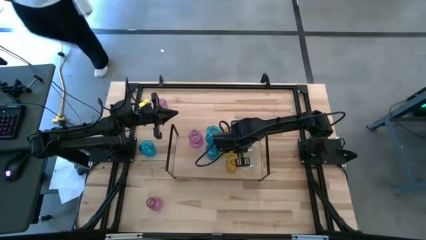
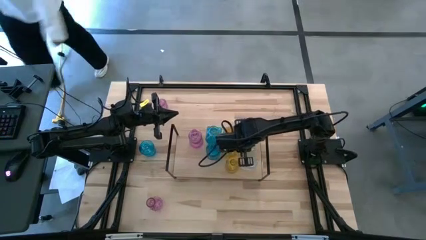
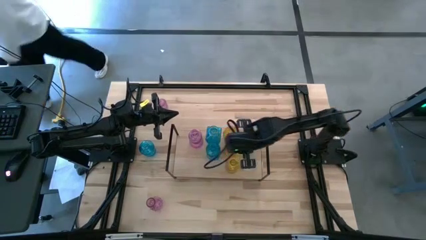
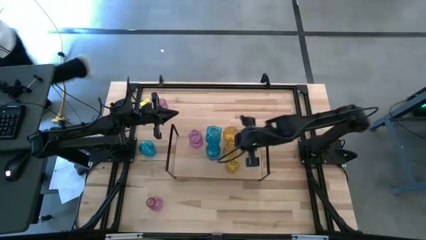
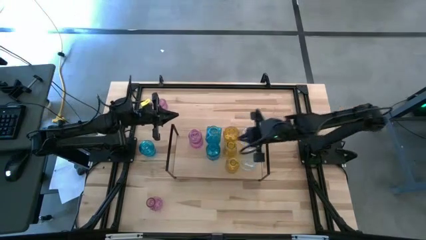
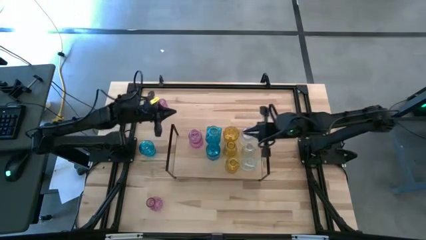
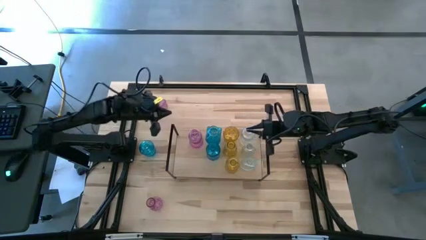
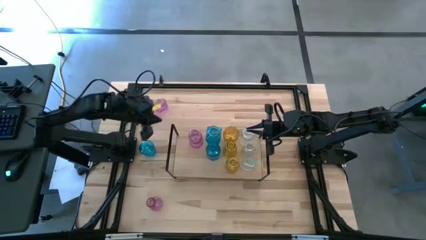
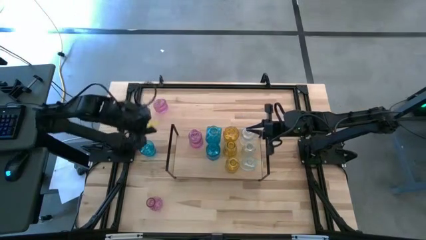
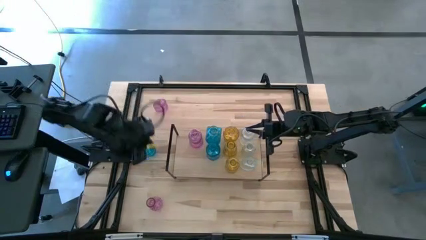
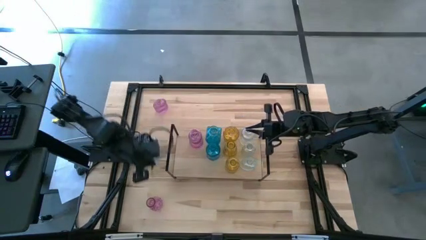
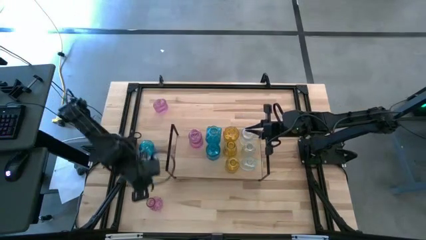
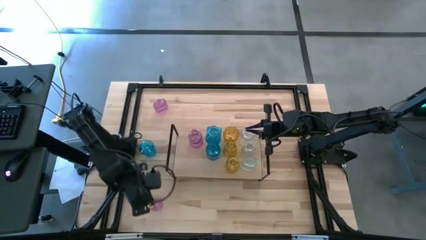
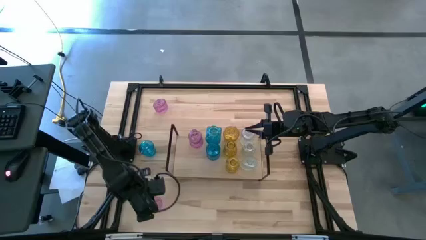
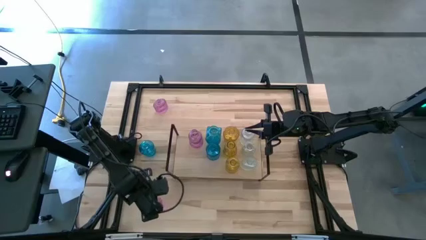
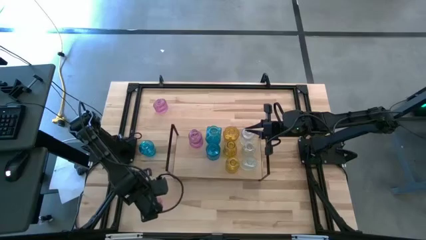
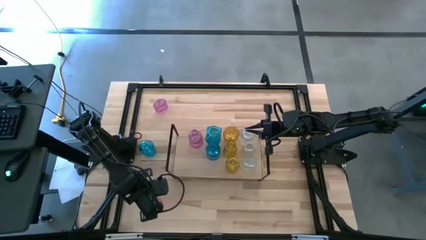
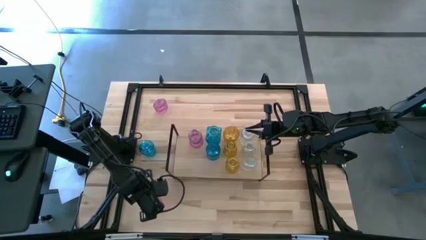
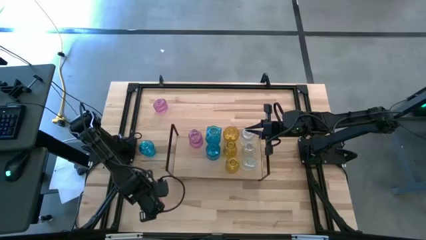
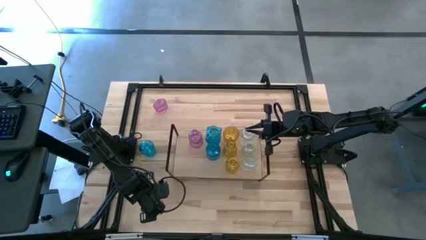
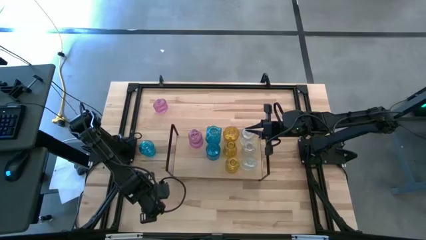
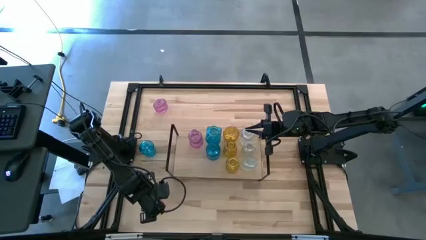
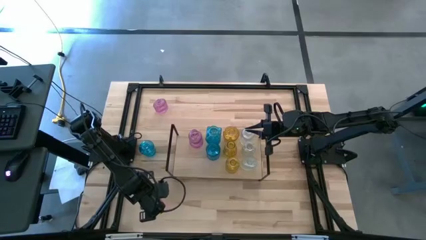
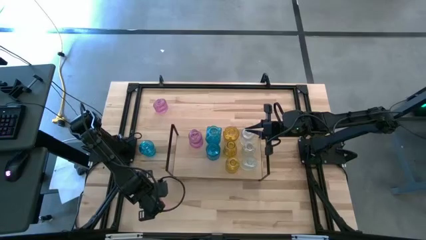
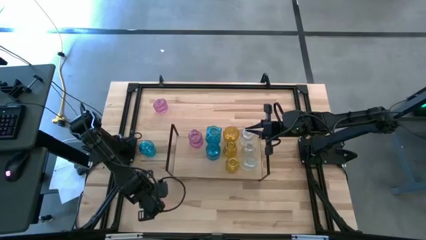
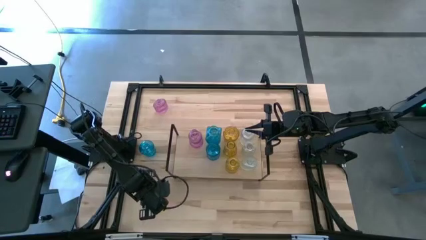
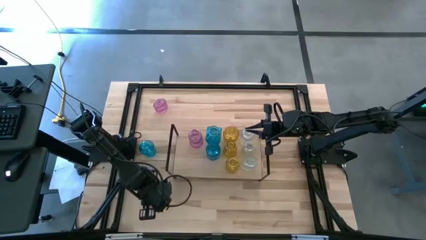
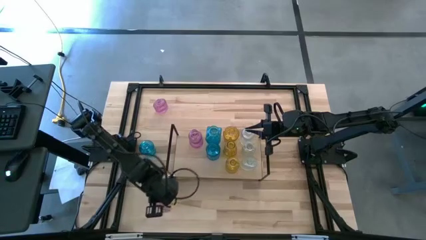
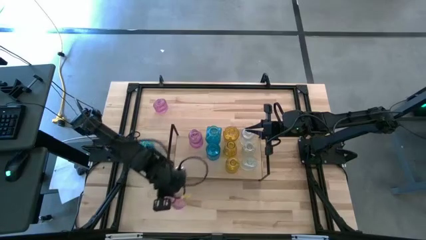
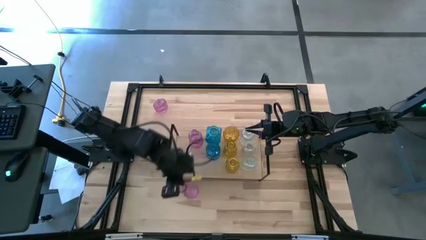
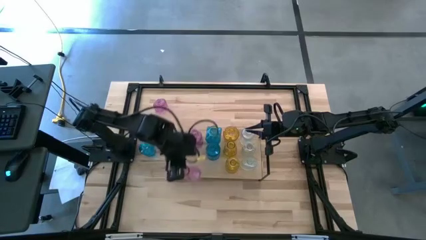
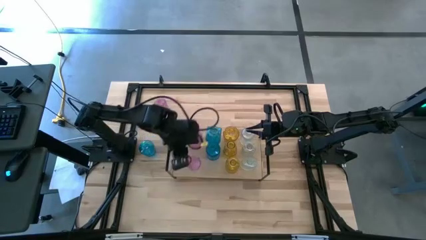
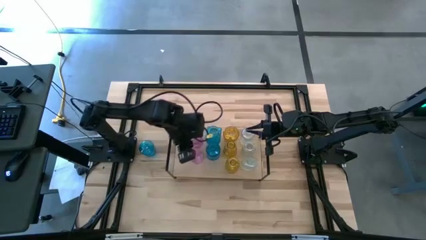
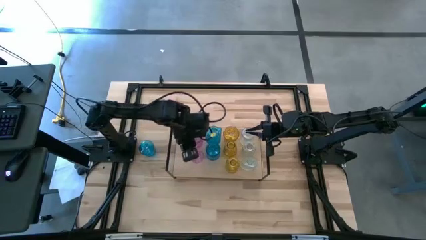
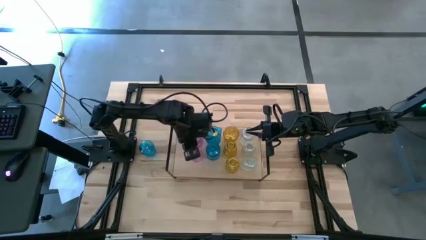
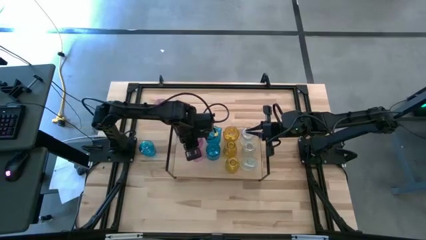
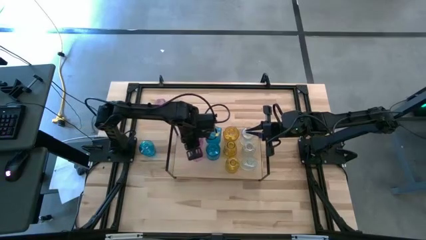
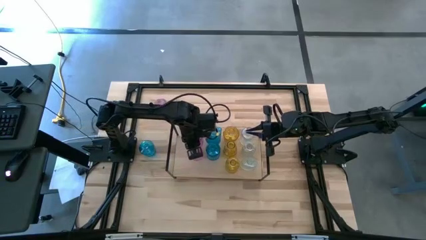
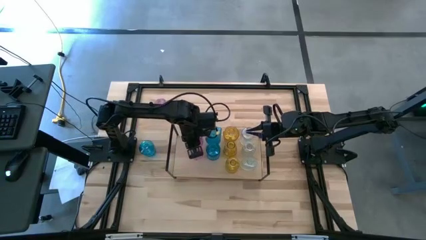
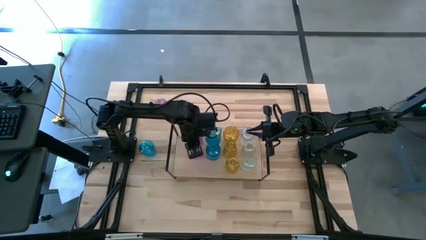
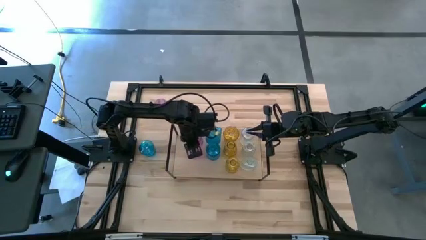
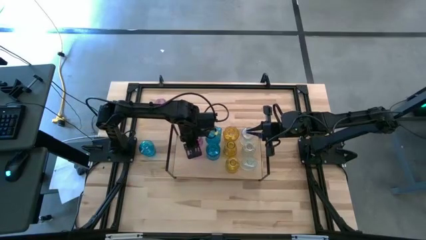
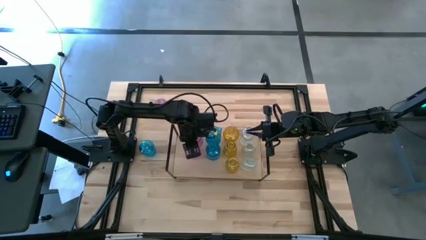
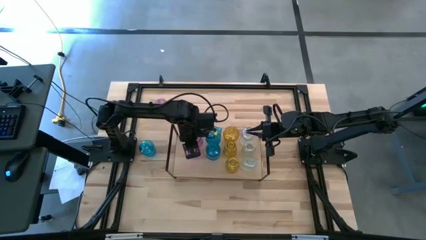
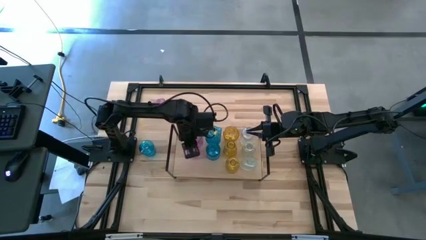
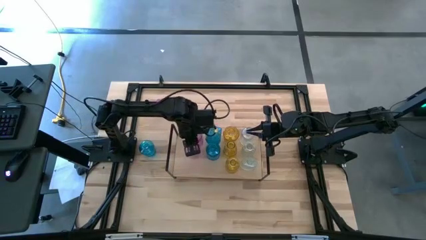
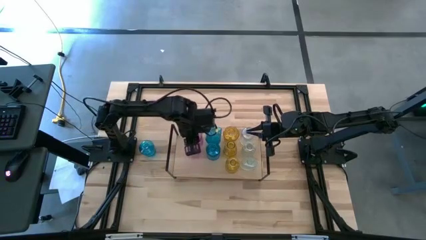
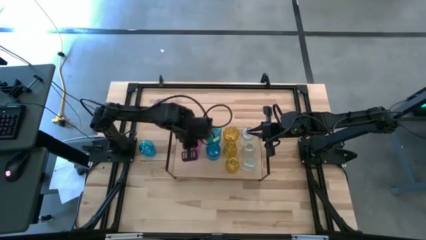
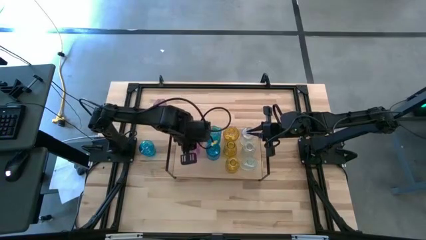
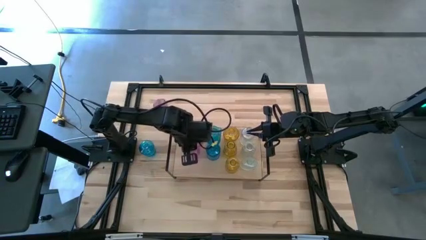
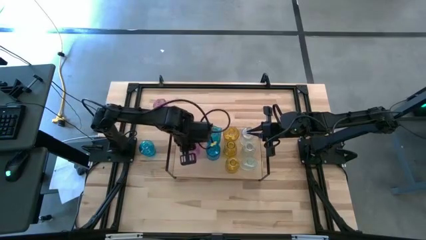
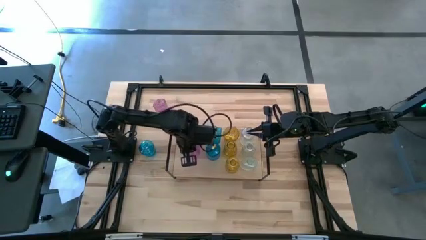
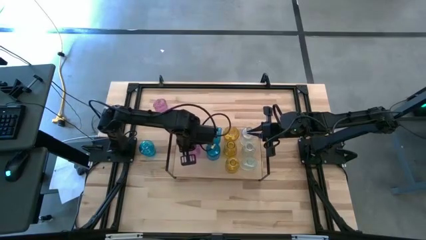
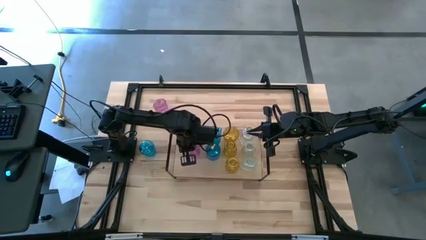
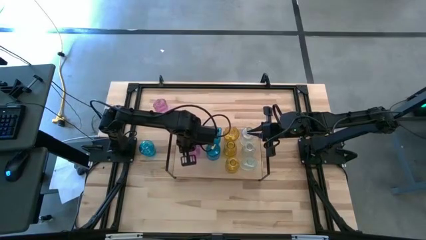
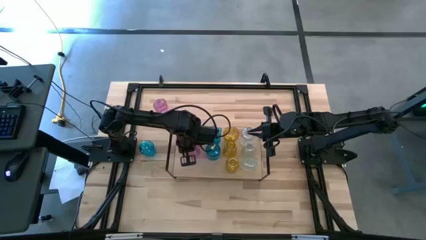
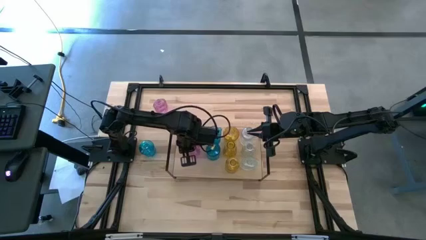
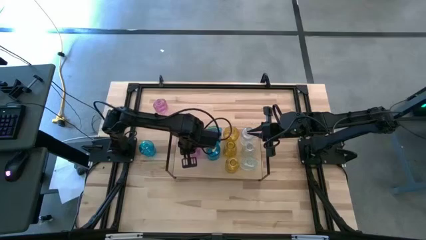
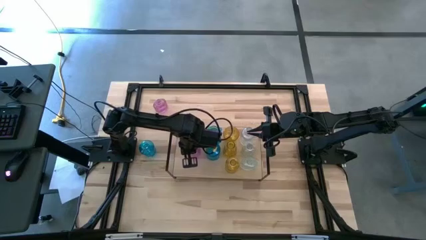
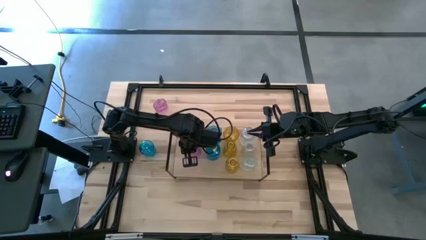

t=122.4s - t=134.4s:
Task: sort vases onto shelf
Put the bottom purple vase on the shelf aligned with the other purple vase

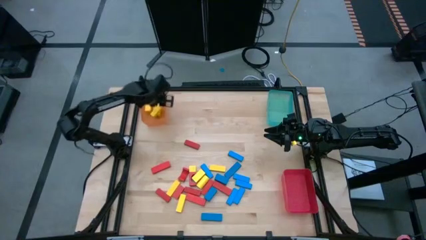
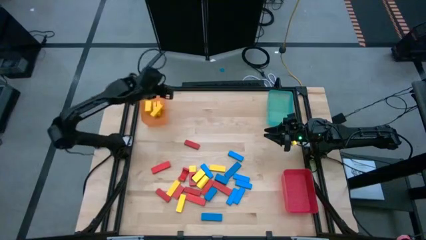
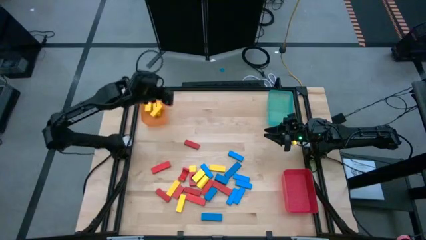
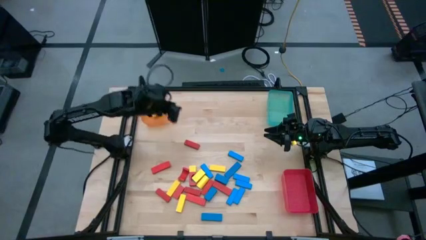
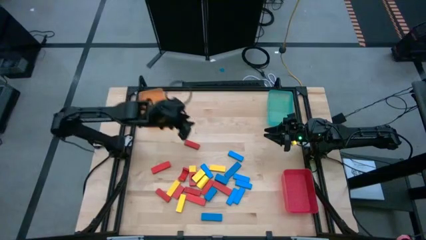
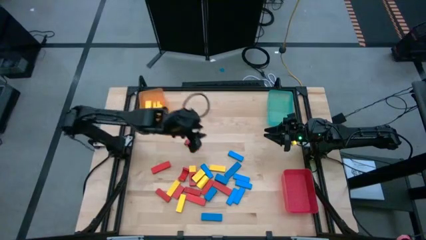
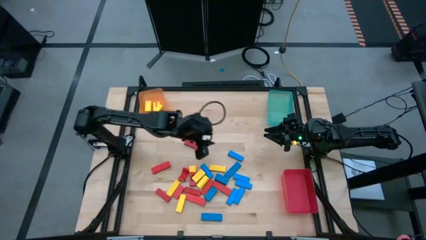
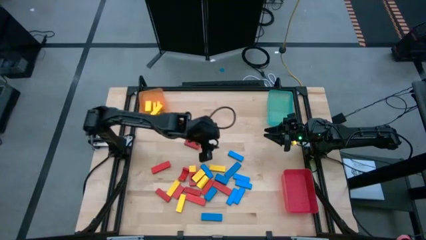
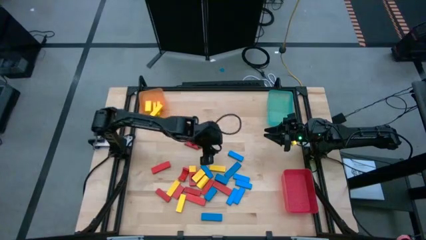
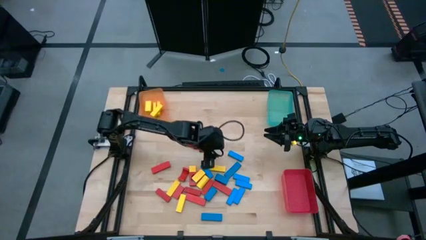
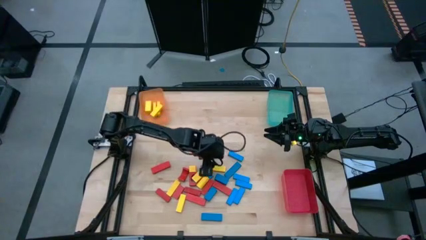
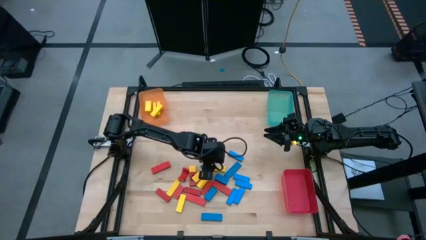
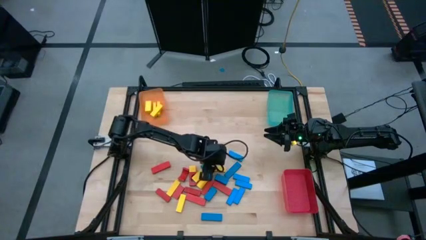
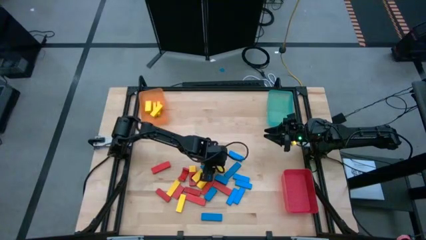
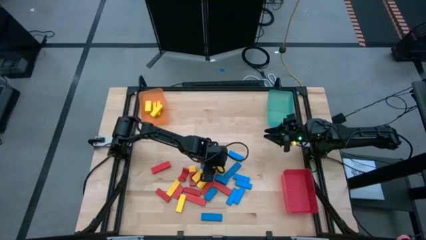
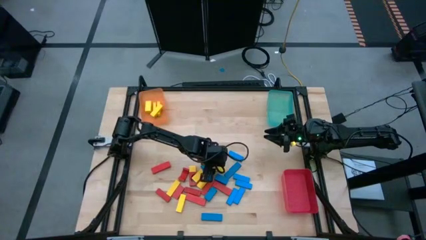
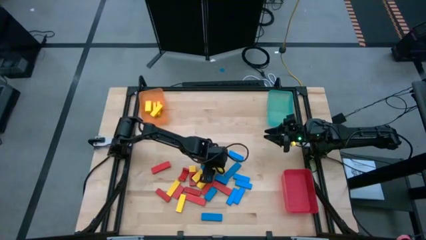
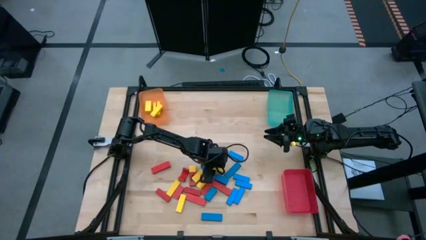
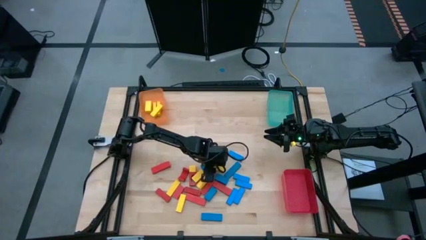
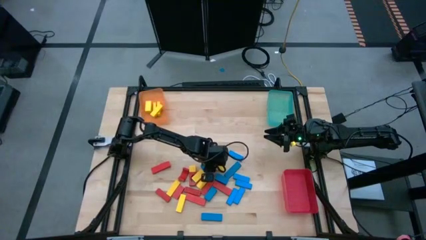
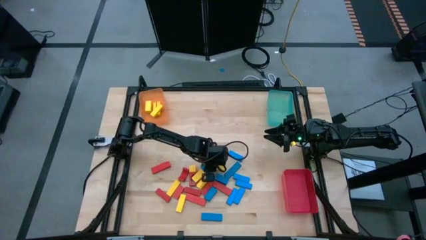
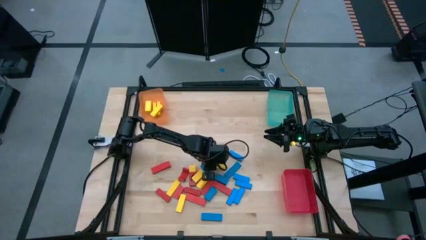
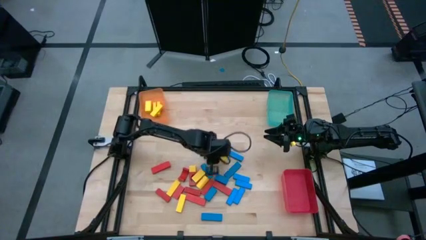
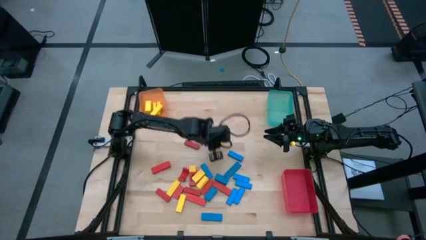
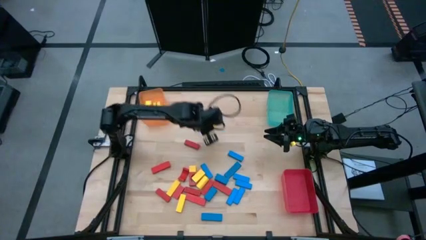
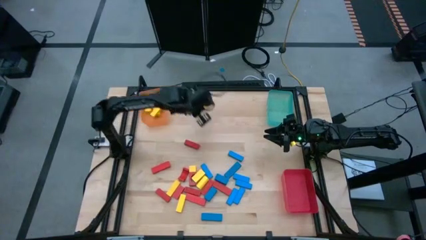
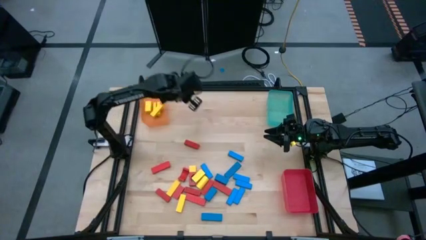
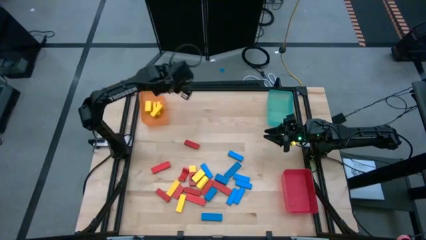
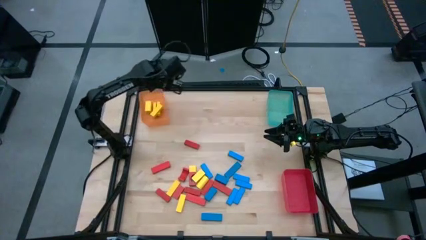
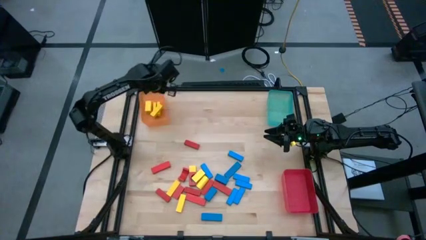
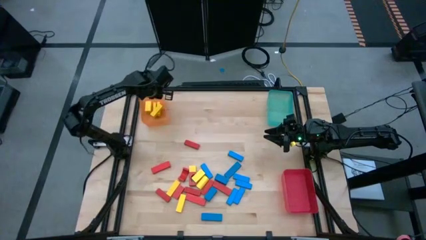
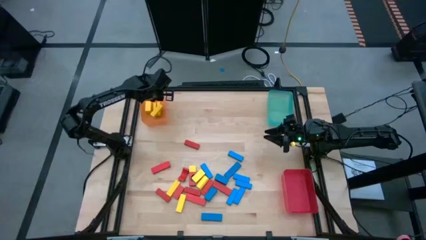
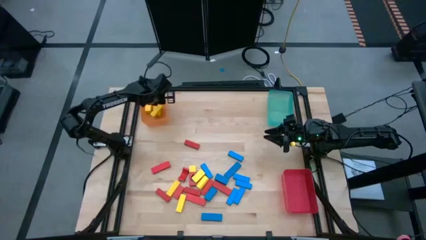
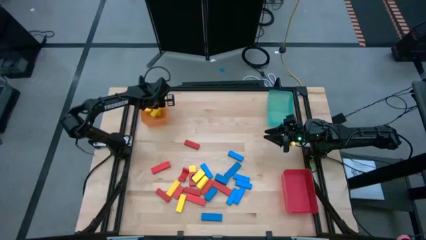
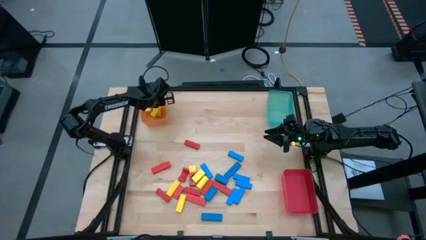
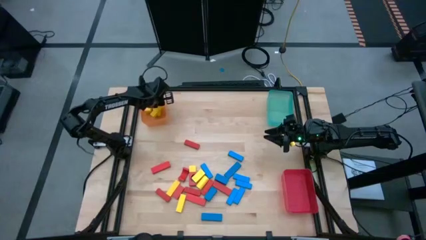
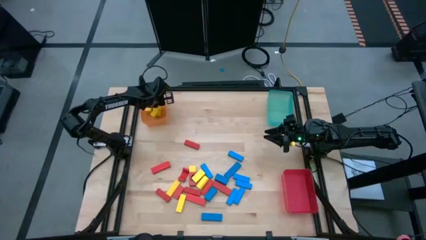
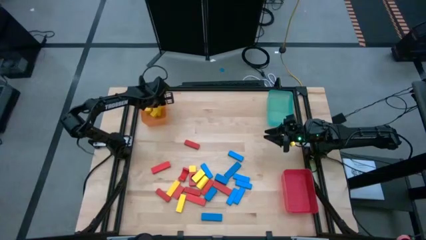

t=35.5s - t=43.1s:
Task: Sort blocks
Put the yellow block into the orange bin
